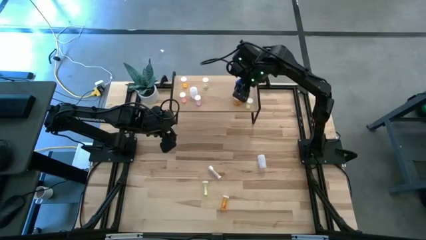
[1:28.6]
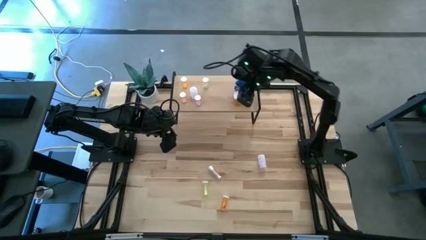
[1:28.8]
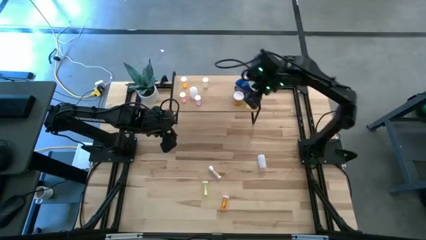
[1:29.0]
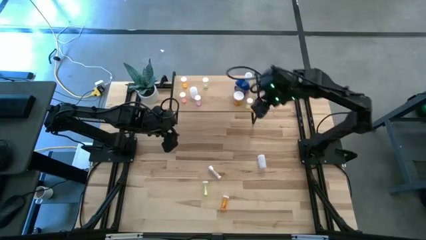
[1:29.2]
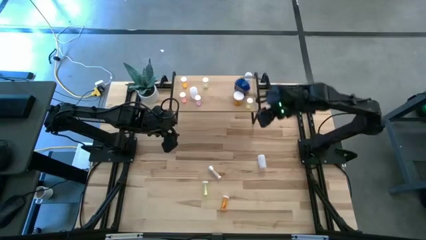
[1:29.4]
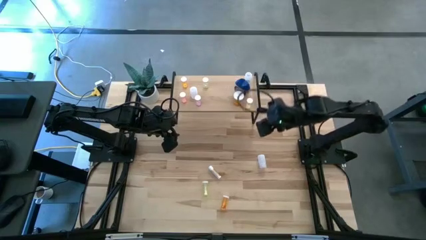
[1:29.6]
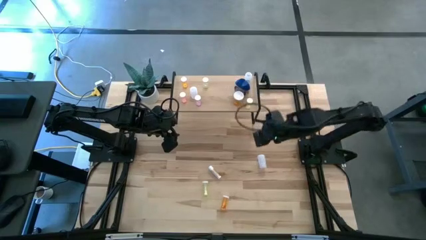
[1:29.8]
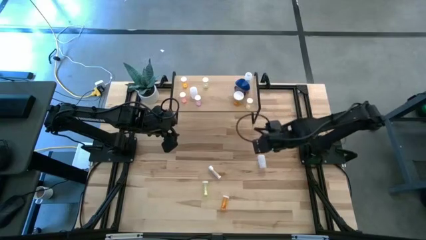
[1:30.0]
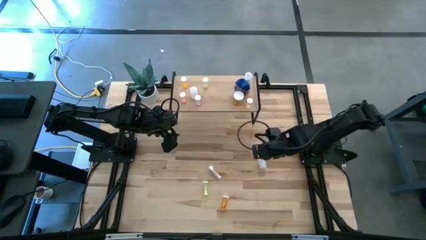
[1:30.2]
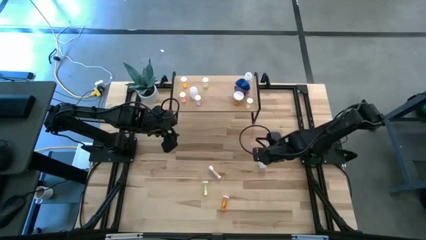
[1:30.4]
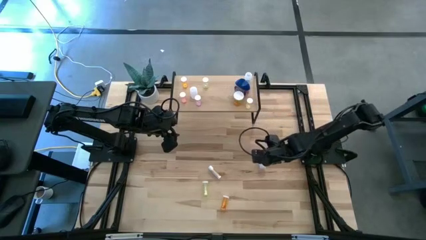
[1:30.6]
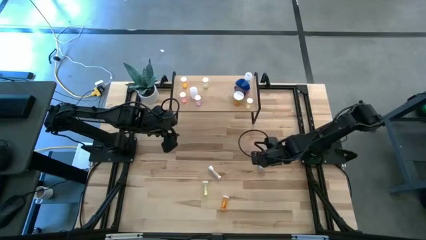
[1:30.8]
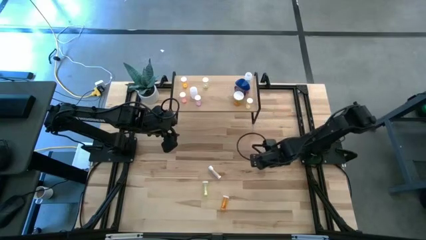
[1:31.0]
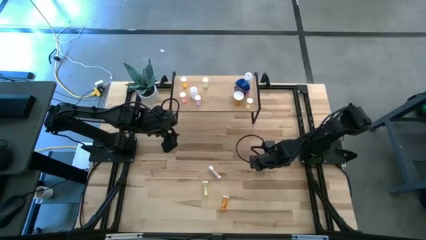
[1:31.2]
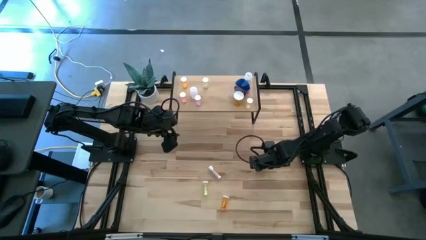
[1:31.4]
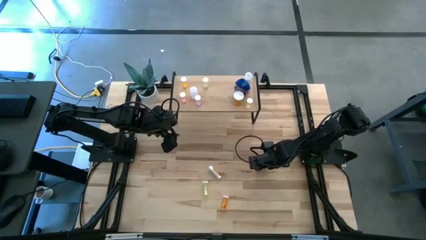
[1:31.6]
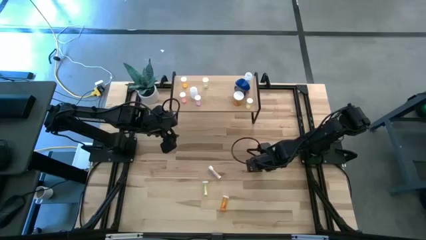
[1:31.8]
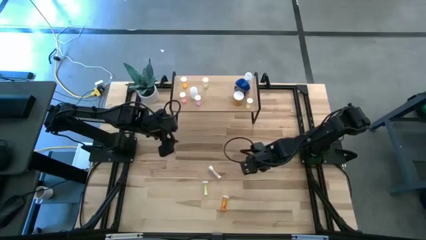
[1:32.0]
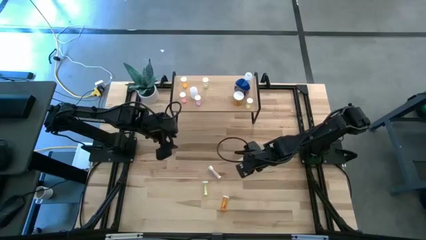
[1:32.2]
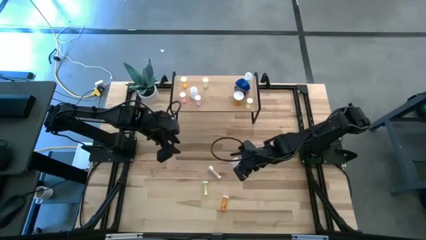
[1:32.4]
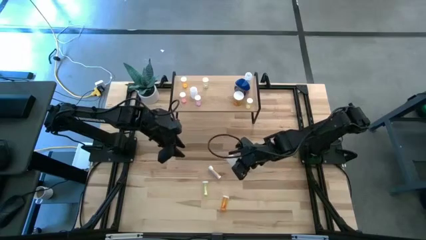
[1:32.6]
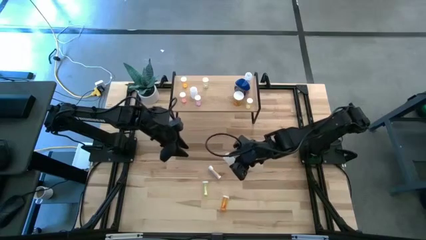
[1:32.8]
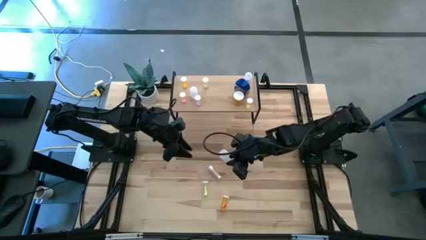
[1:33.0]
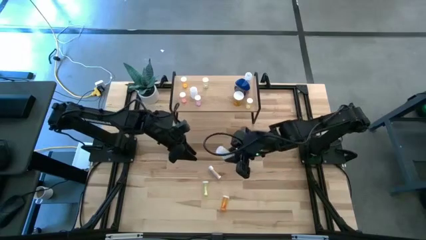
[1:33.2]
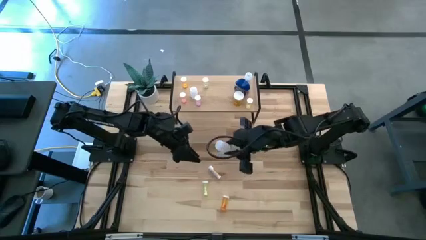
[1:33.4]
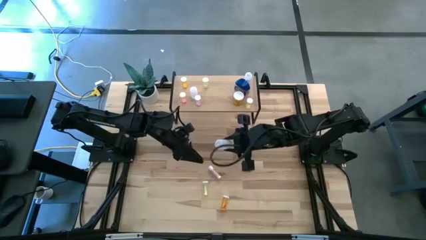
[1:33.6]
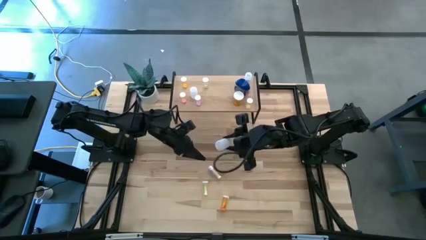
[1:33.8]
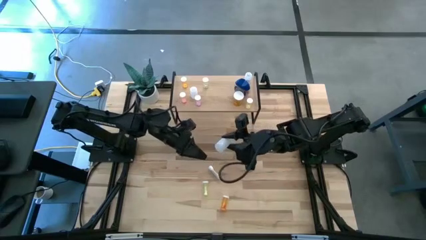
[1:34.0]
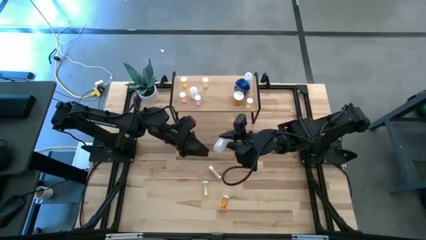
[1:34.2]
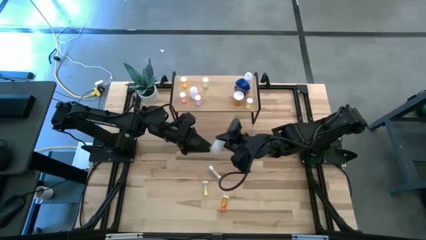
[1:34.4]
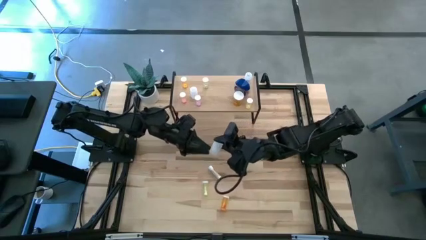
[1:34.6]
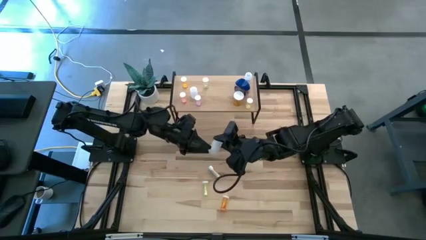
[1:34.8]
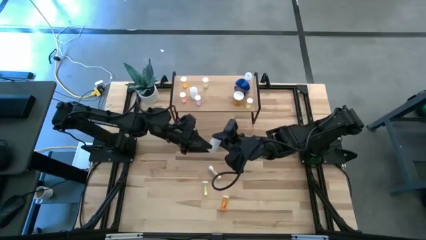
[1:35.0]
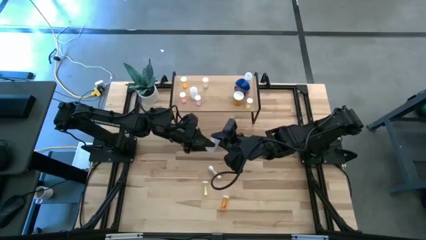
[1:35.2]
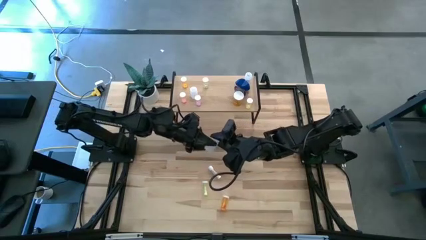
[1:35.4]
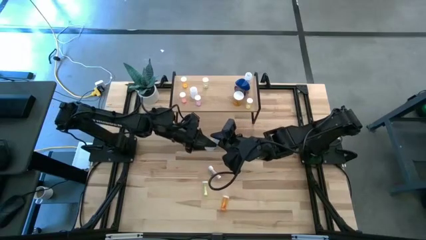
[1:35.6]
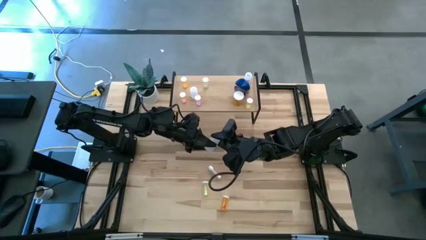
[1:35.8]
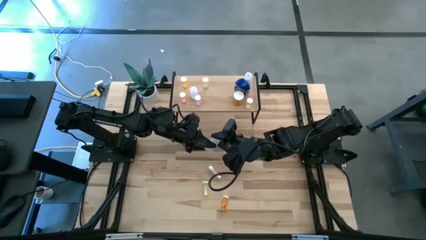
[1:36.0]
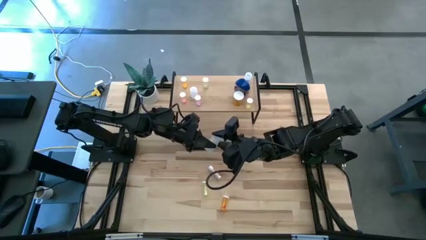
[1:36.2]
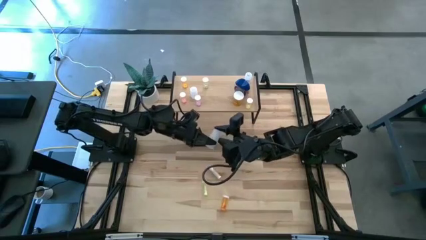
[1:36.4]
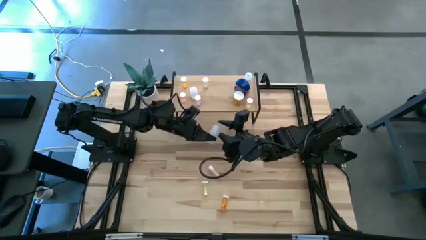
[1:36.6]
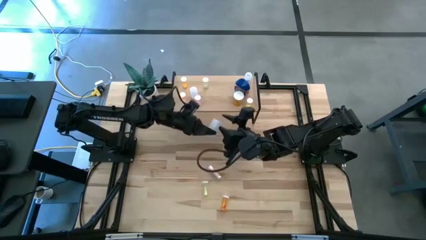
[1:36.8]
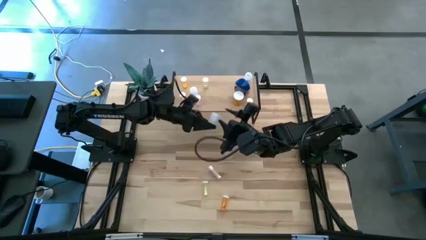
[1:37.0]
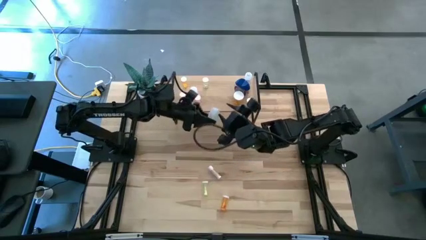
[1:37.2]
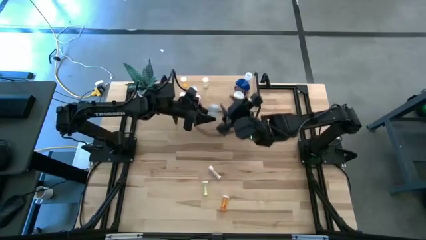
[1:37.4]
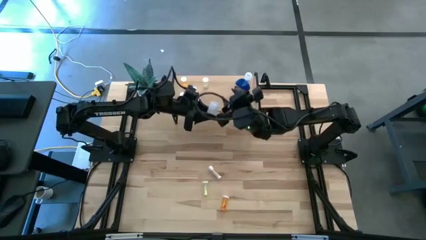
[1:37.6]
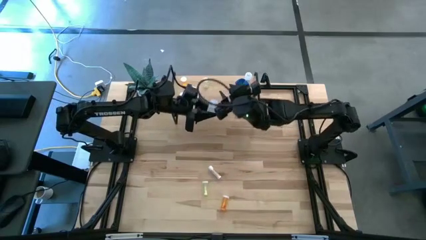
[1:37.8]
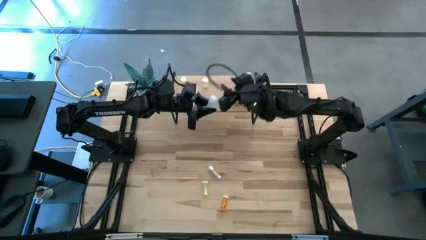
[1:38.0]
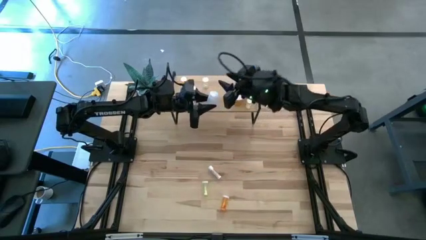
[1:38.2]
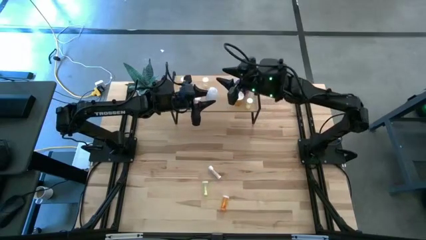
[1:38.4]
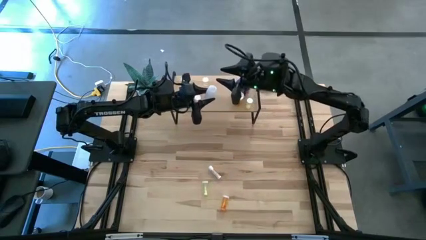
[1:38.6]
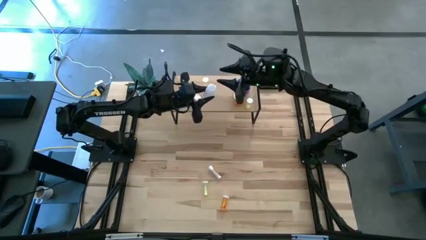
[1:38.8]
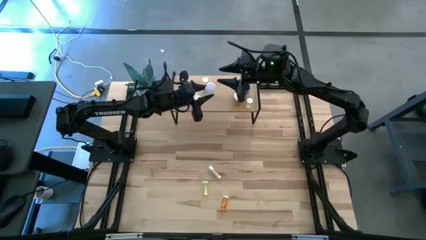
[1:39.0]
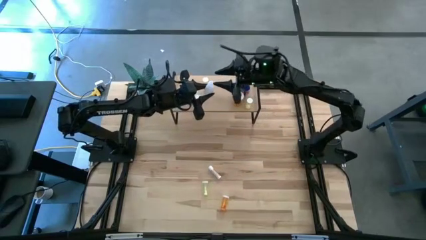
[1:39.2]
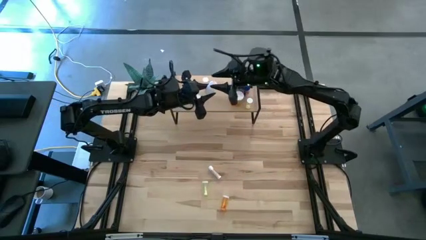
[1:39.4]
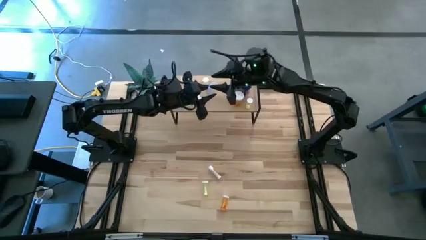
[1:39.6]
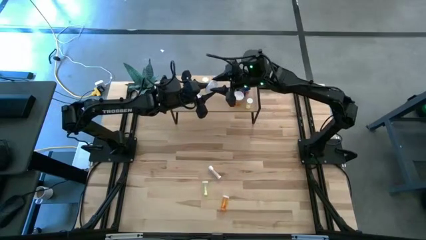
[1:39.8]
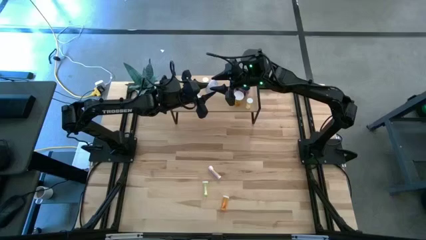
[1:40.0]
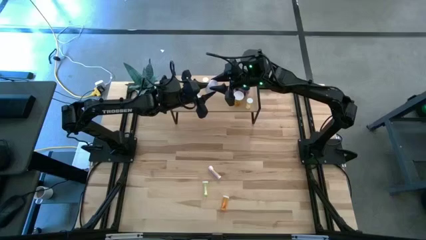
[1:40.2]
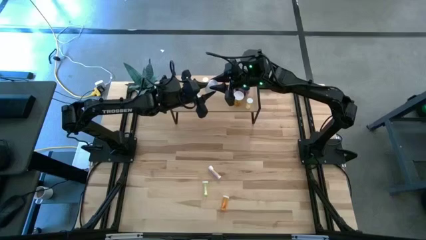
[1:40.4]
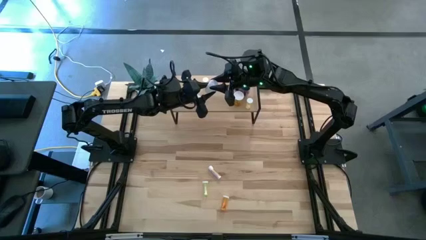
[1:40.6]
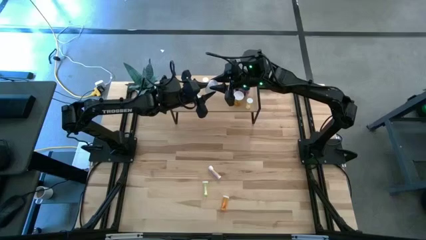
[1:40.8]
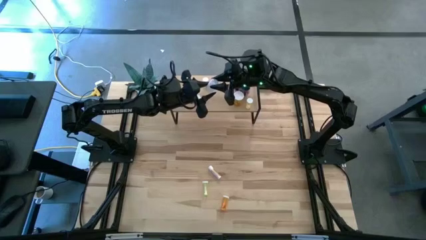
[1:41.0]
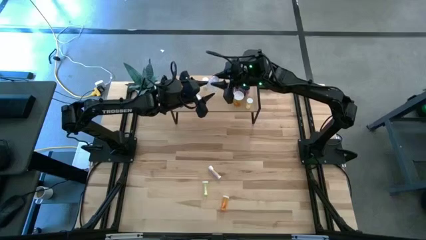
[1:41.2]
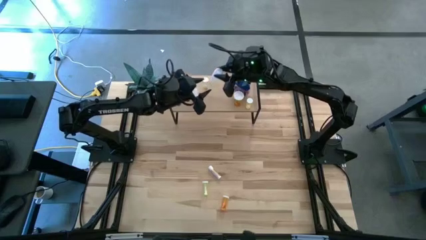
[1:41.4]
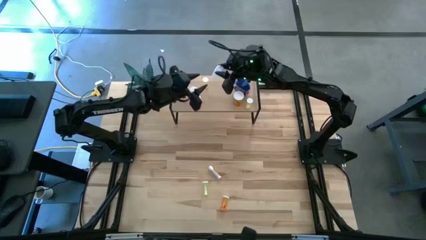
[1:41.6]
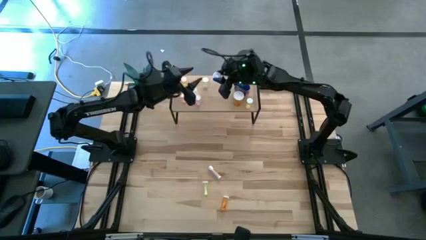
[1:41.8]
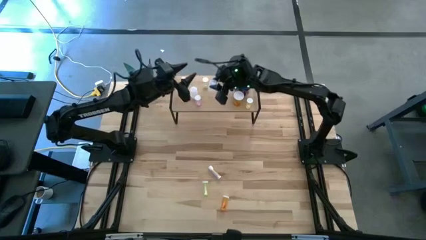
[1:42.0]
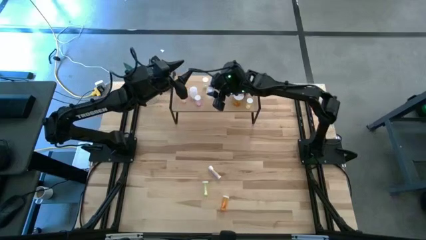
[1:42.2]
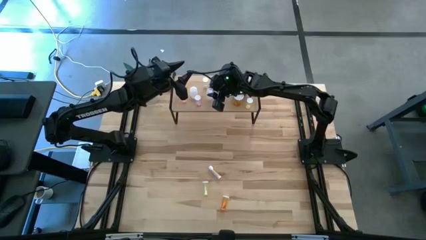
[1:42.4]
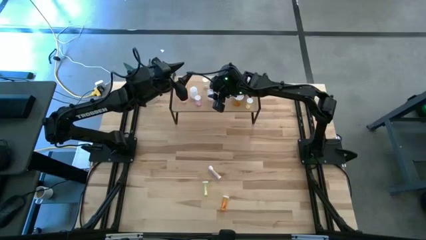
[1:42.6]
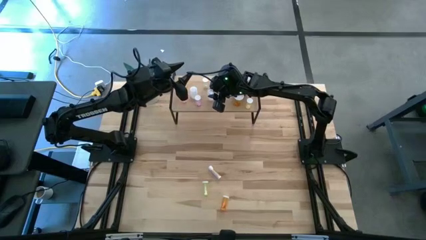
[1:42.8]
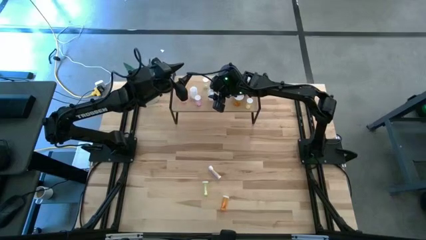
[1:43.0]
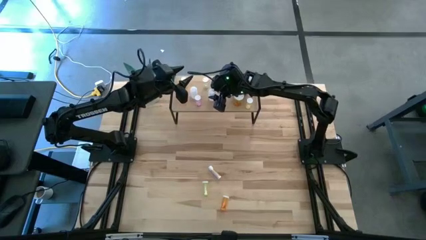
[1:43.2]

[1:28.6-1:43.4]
Task: Pick and place medicine bottles onto shelf by color
Put the white pill bottle on the shelf

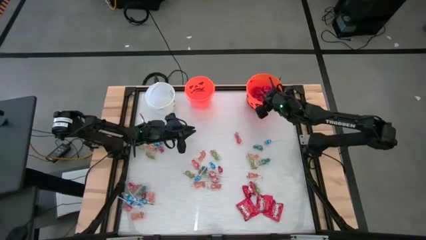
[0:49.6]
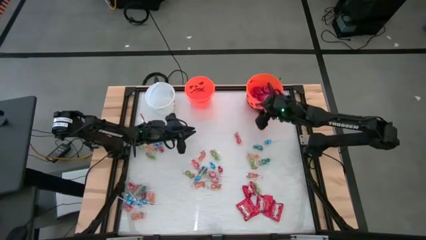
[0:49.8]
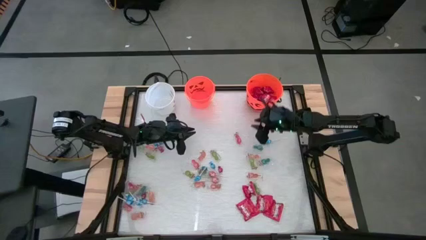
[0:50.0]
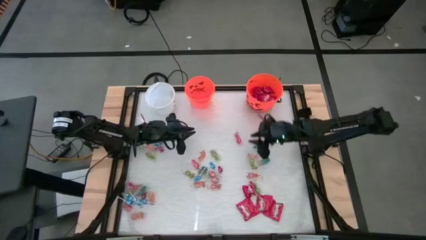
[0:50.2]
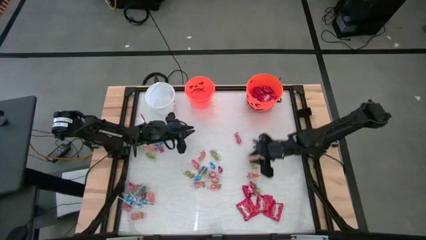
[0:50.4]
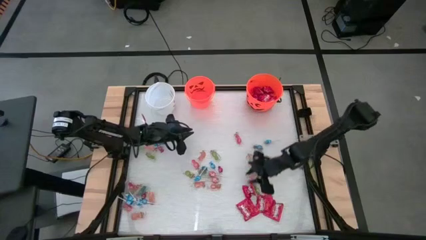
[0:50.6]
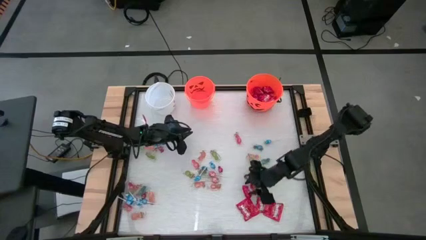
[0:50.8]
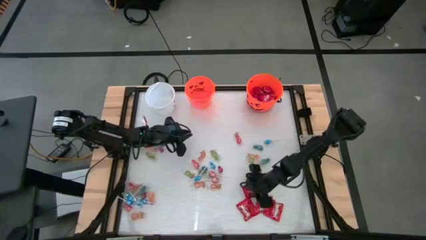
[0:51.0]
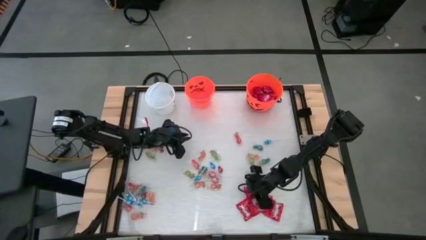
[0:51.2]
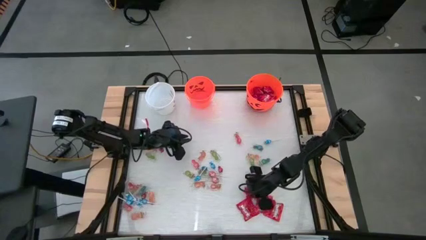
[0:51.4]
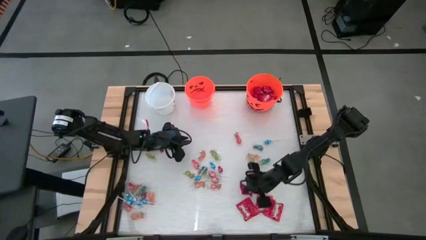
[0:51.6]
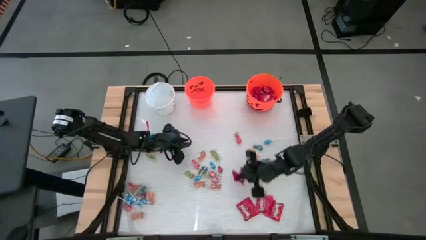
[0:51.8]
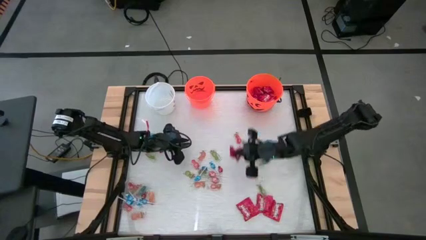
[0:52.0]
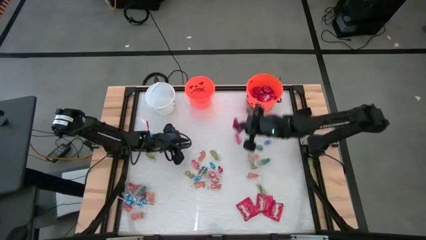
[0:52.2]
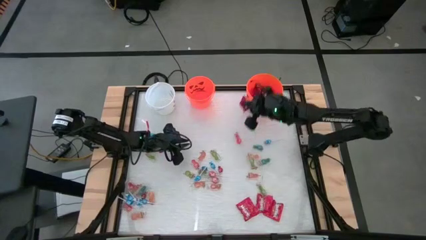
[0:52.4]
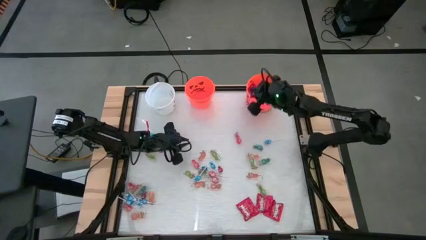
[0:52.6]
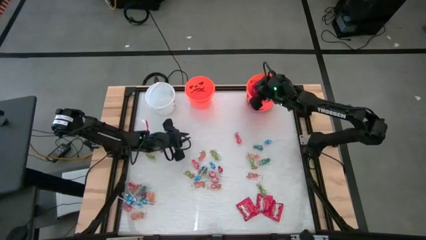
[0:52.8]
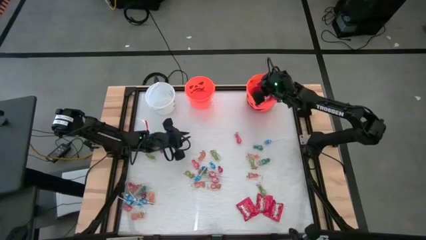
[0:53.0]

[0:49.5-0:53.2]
Task: Sort candy by brand, put in halloween buckets
Put the red candy into the right orange bucket
